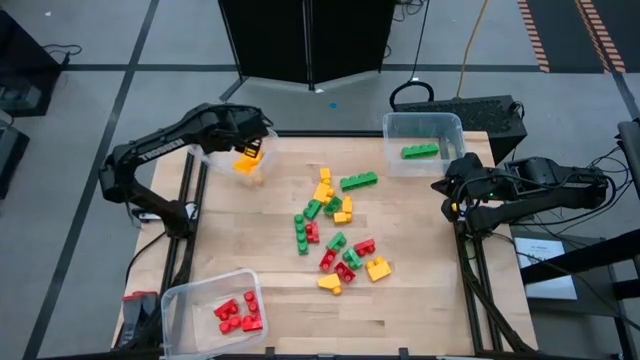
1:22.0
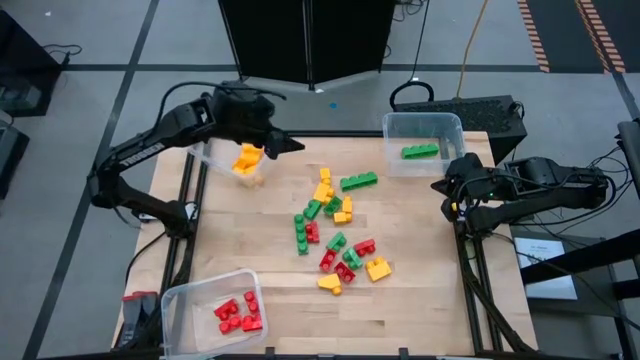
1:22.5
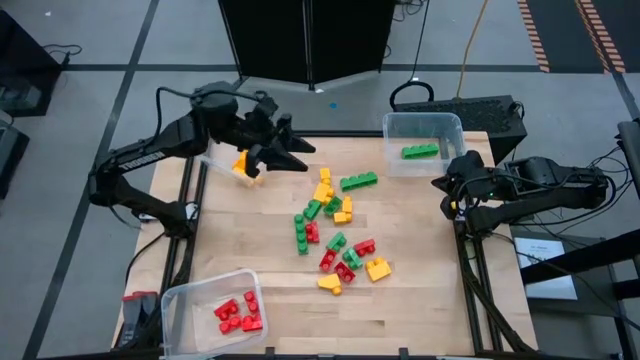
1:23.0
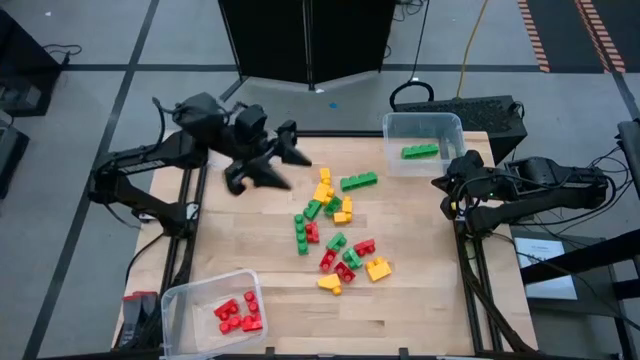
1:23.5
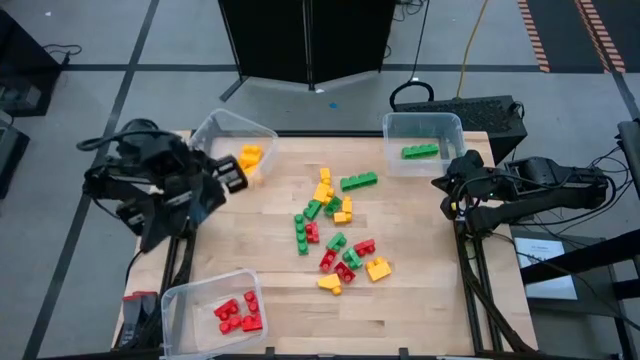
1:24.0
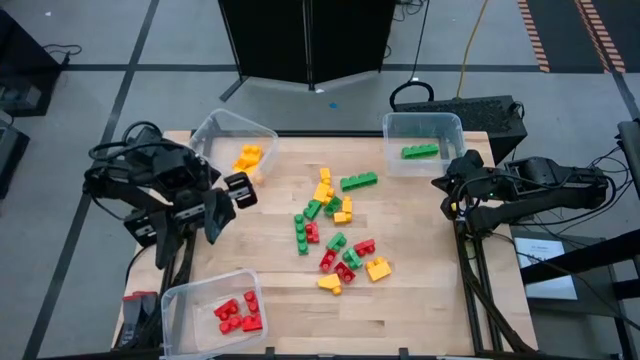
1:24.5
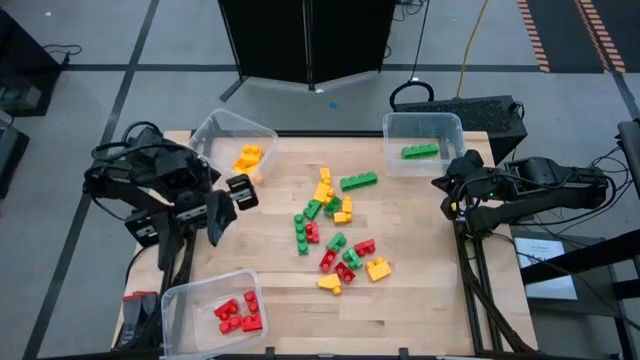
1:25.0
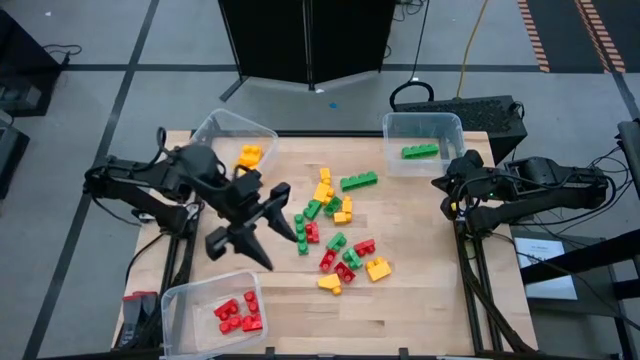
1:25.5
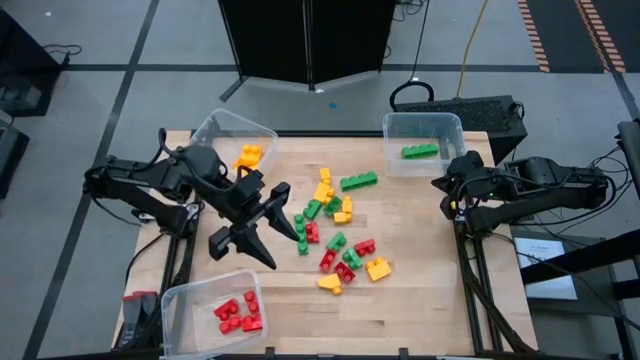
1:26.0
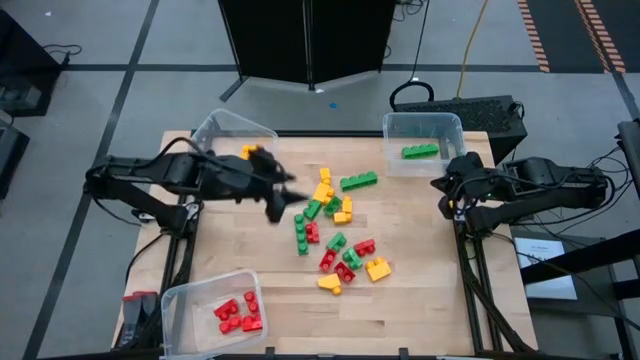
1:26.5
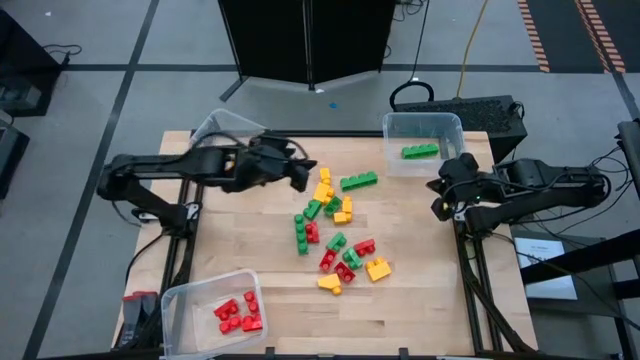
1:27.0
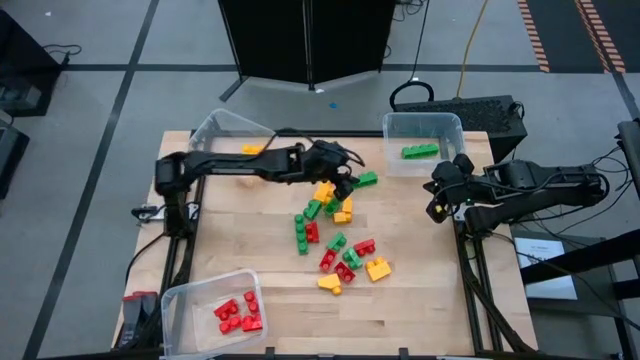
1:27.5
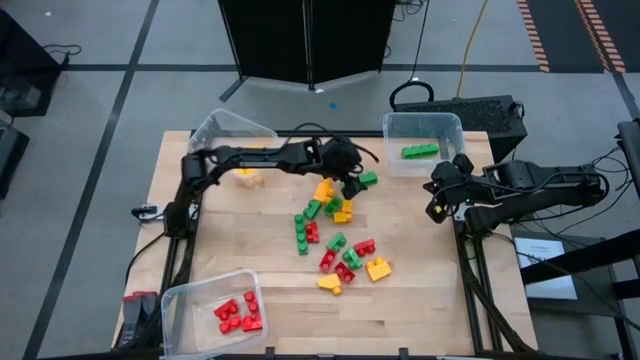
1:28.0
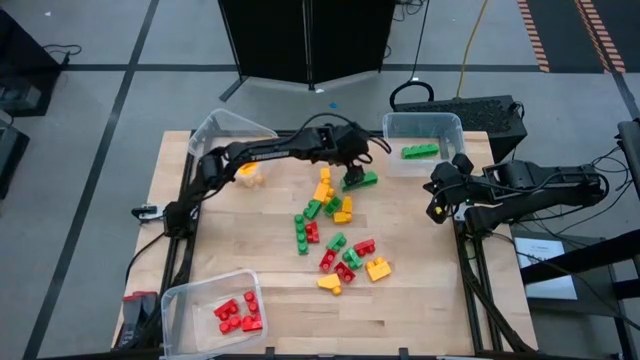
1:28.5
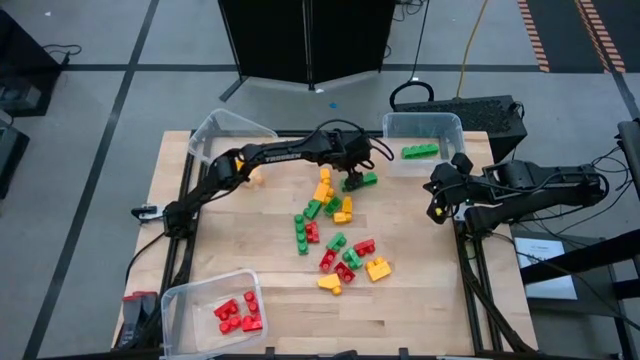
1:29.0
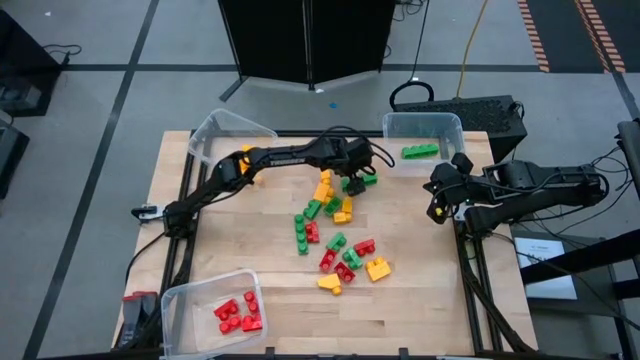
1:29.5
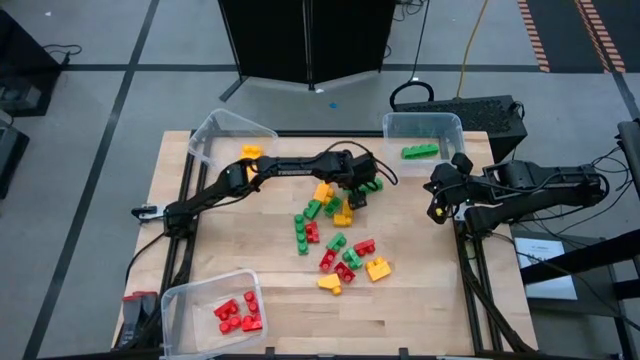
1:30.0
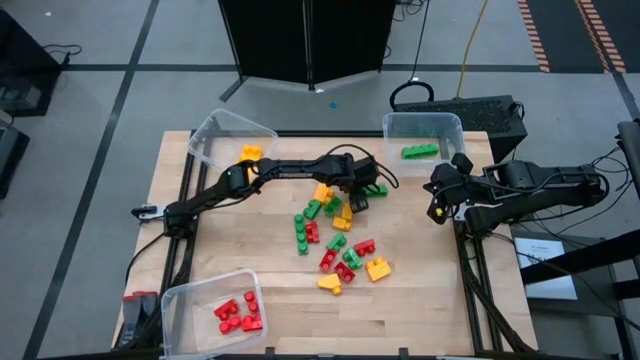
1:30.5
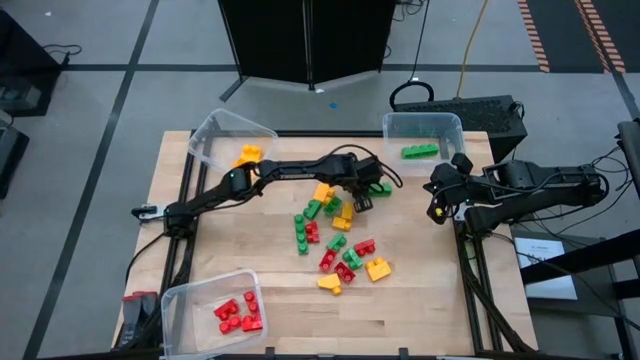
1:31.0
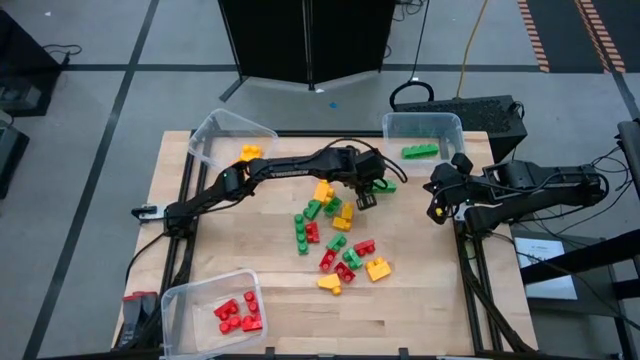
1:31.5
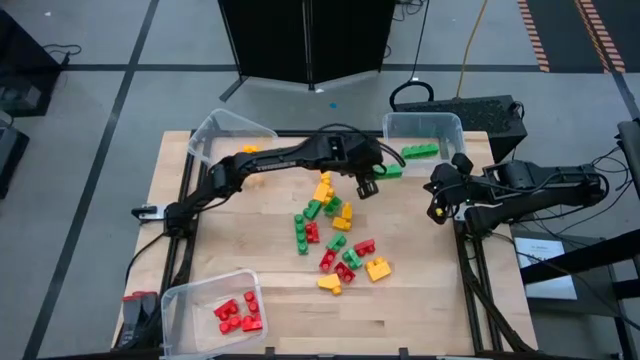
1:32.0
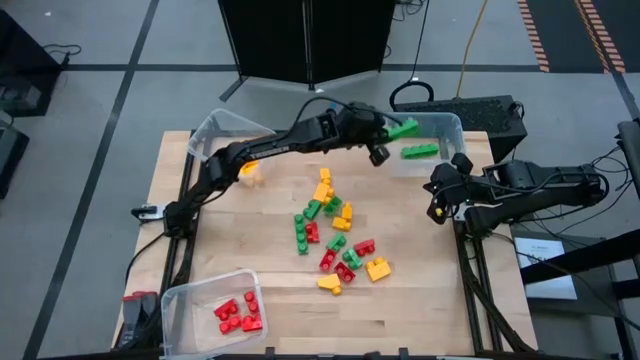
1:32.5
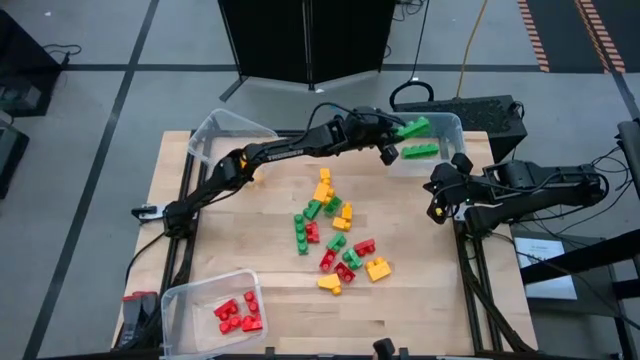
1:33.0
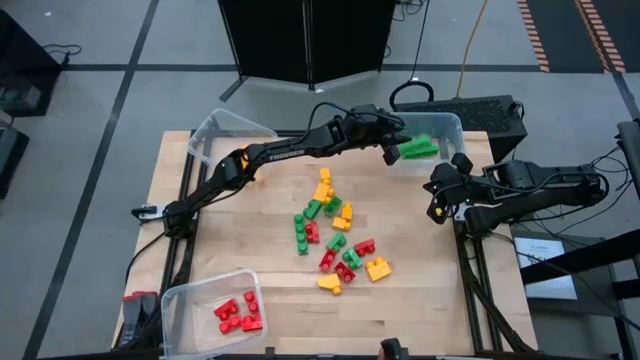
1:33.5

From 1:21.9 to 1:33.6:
Task: Sort blocks
Put the green game piece into the top right transparent bin

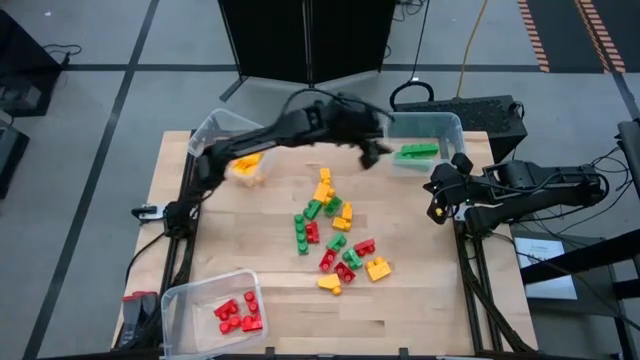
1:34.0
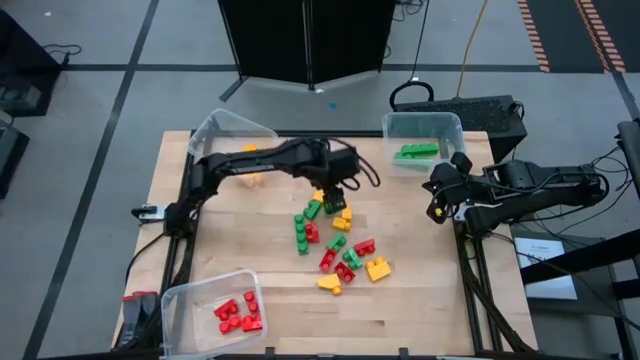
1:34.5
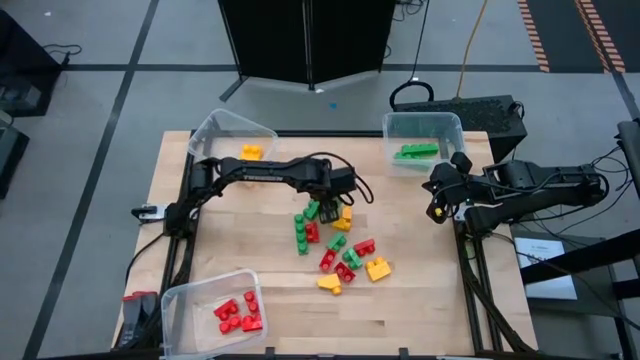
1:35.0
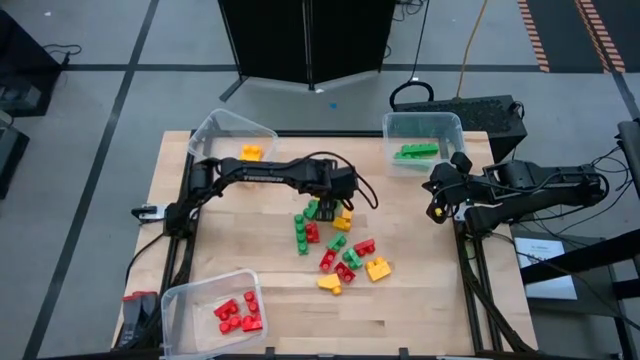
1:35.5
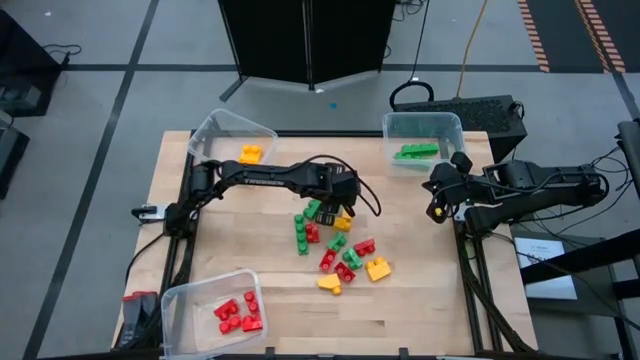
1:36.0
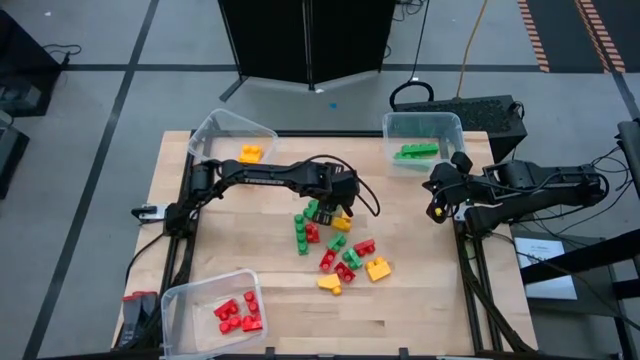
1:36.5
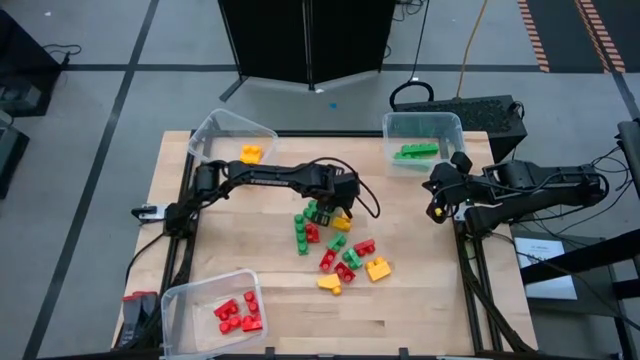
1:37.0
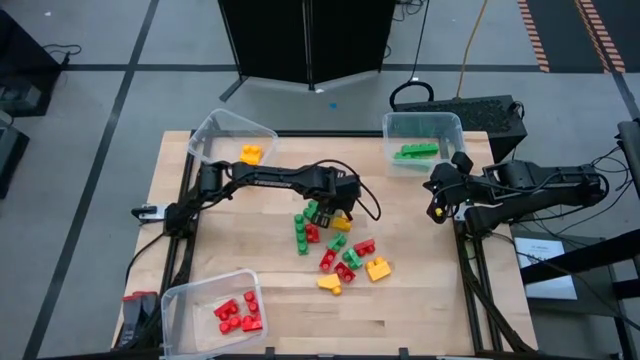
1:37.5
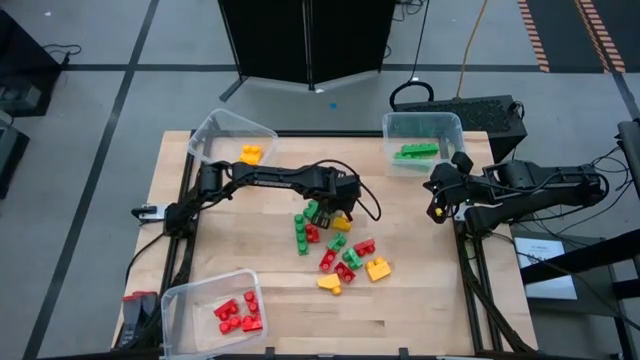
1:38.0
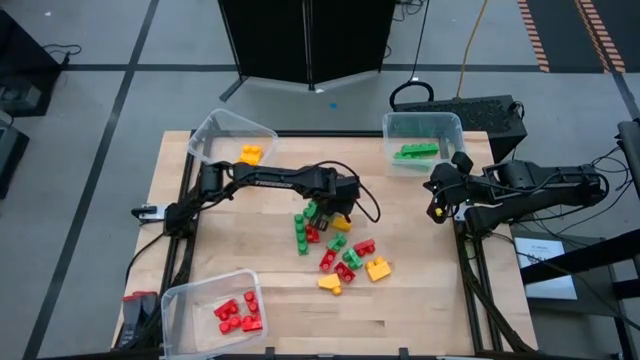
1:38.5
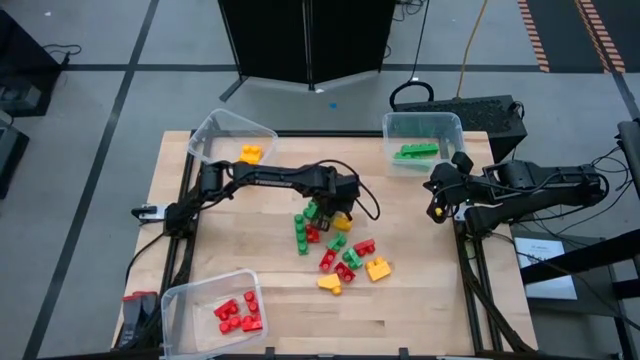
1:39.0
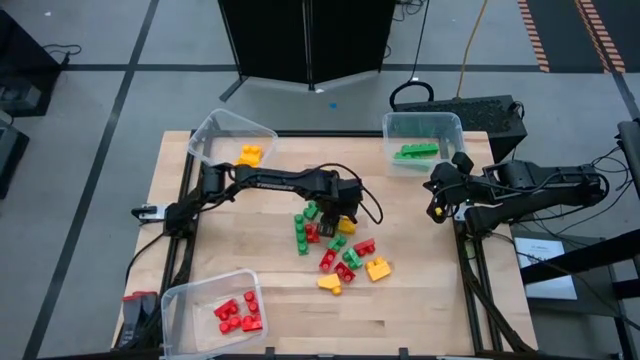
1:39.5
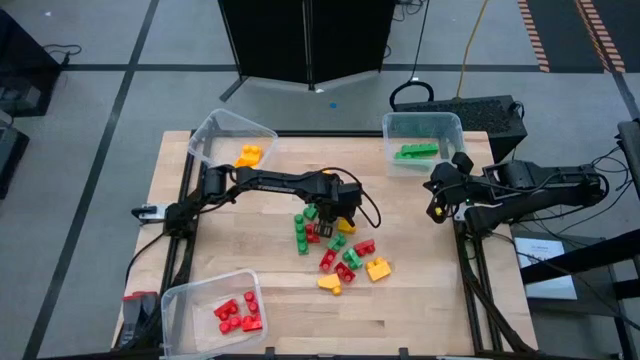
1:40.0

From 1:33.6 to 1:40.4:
Put the green game piece into the top right transparent bin

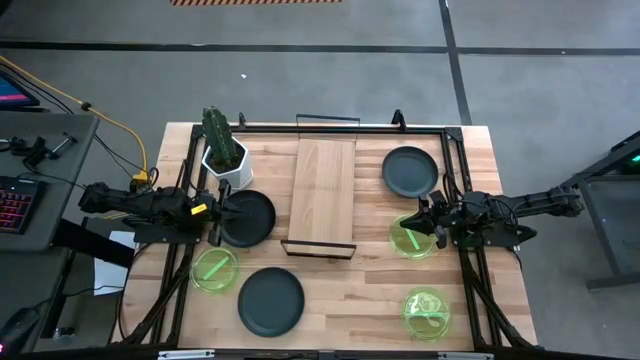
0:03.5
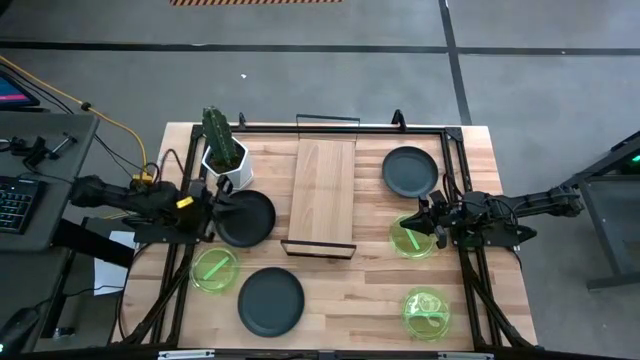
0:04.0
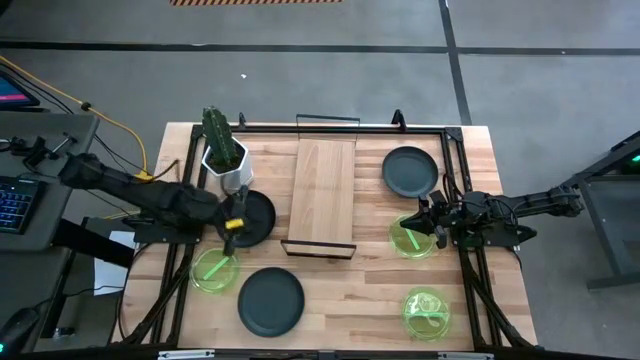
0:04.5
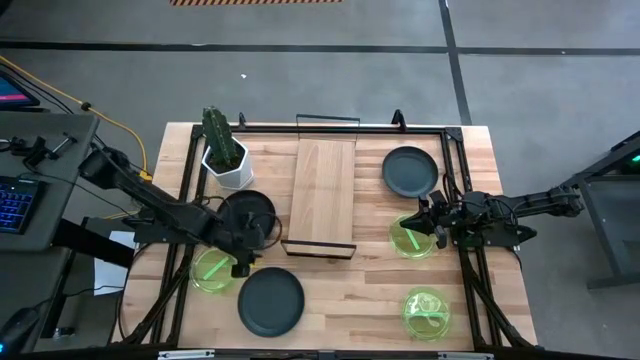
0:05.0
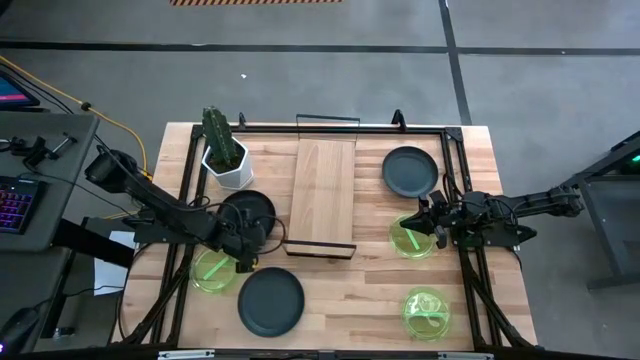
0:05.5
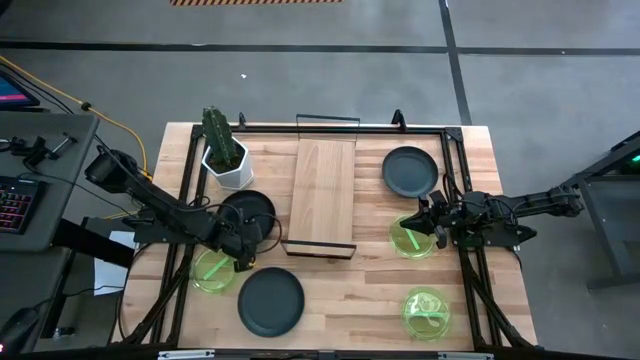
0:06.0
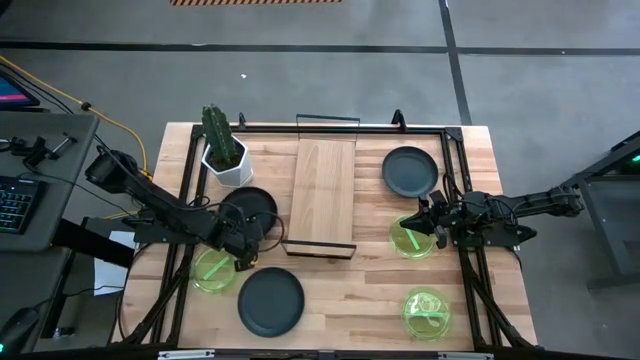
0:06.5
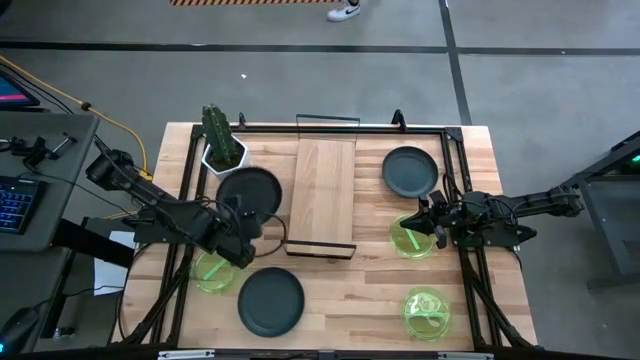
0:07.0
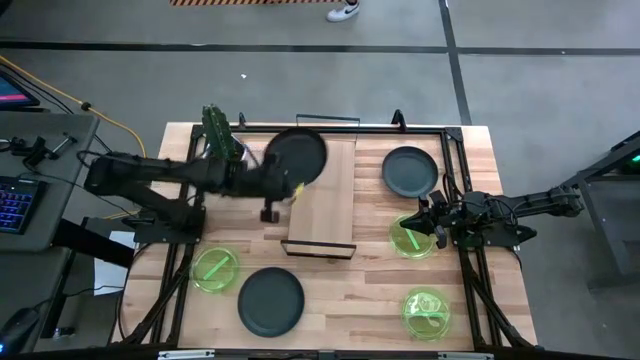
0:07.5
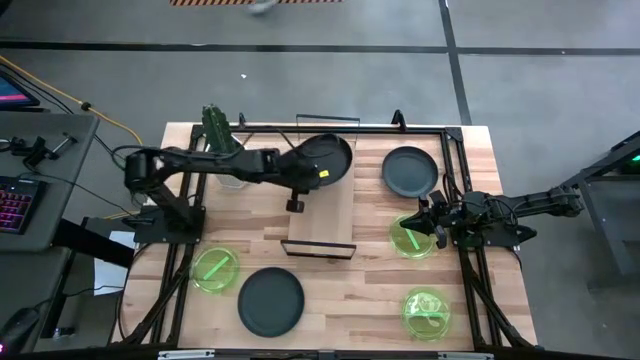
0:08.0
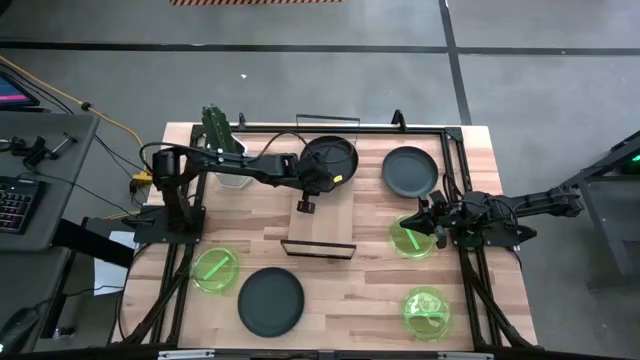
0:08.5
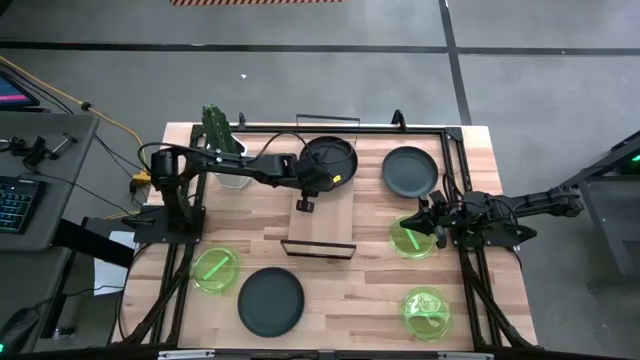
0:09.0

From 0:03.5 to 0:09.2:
Task: Place and stack plates onto a shelf
Put the center black plate on the shelf
